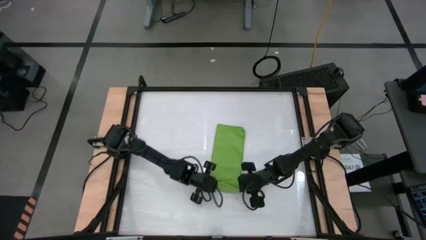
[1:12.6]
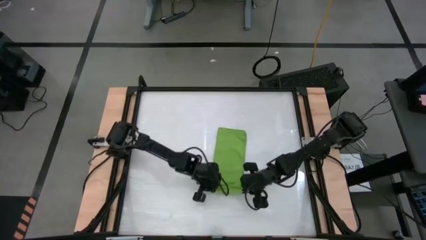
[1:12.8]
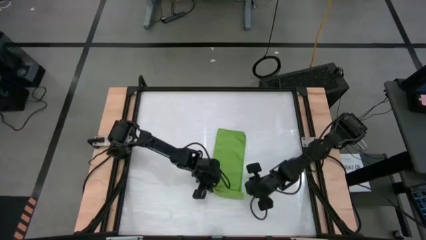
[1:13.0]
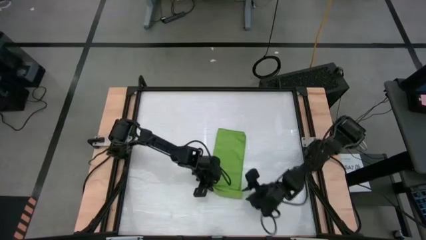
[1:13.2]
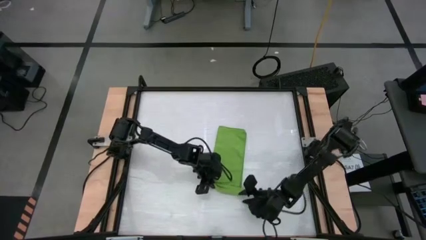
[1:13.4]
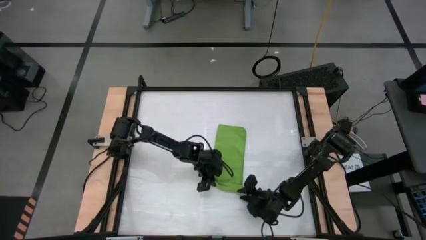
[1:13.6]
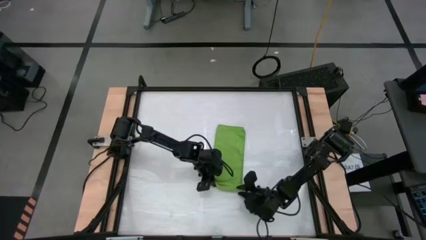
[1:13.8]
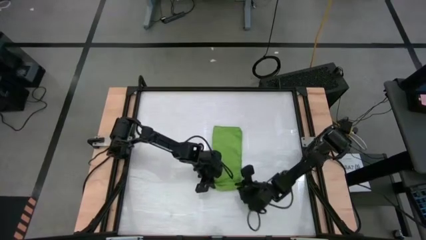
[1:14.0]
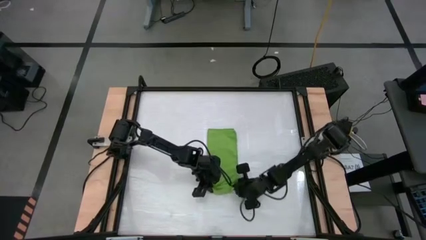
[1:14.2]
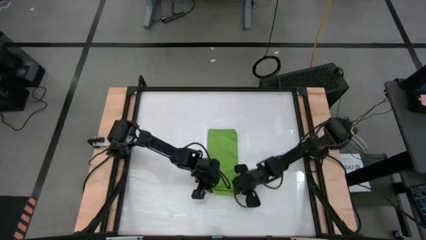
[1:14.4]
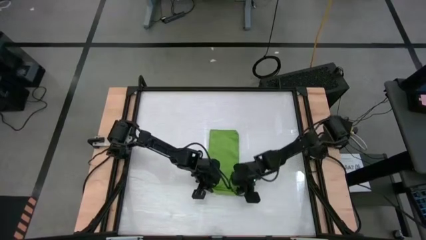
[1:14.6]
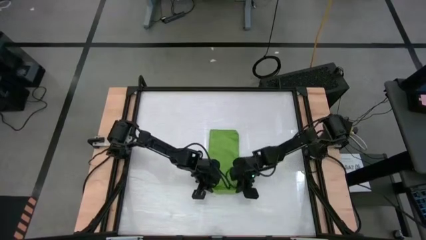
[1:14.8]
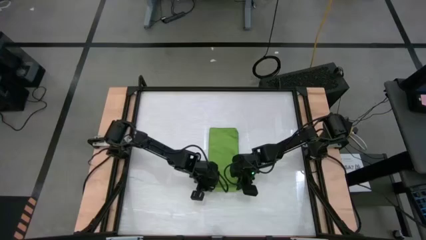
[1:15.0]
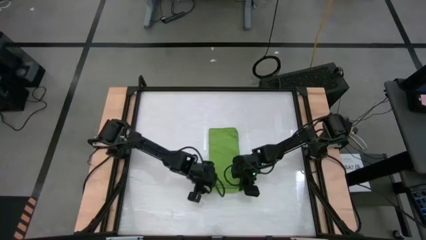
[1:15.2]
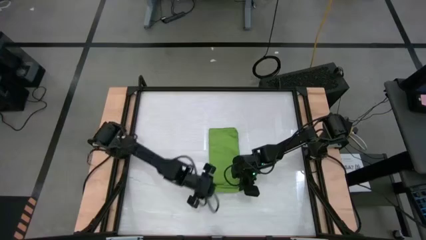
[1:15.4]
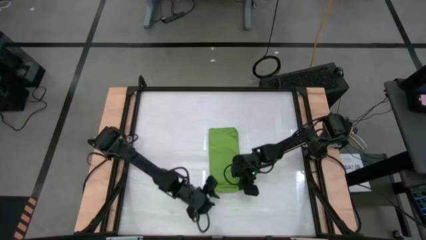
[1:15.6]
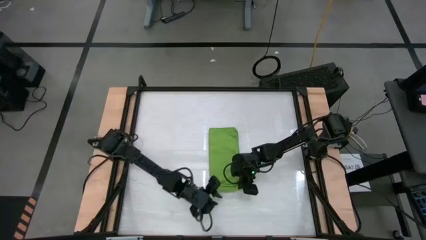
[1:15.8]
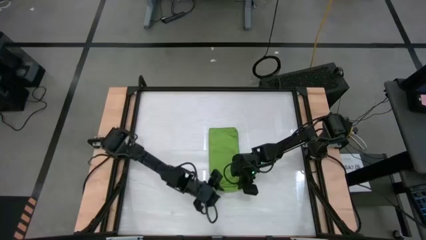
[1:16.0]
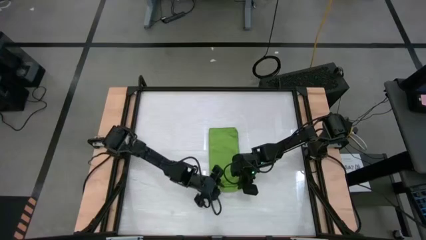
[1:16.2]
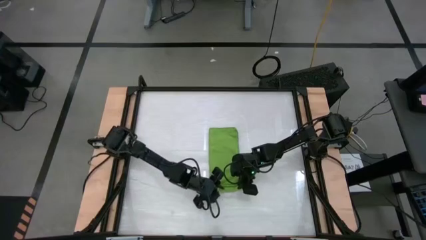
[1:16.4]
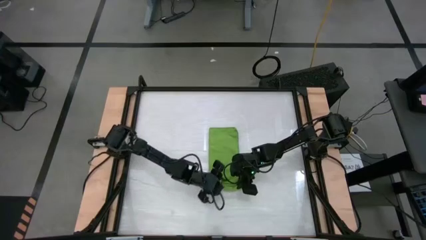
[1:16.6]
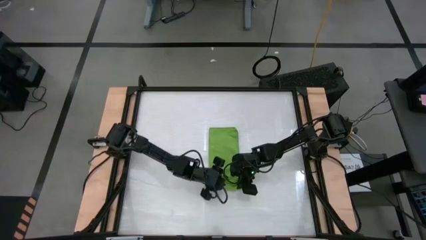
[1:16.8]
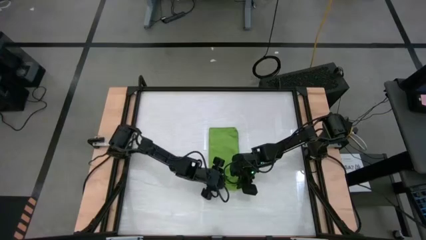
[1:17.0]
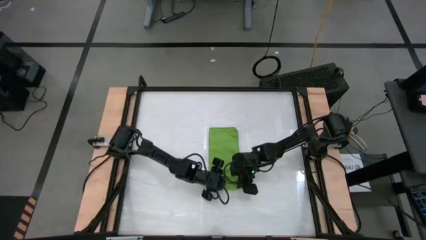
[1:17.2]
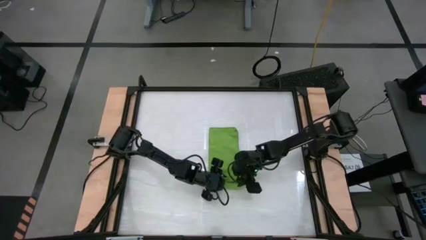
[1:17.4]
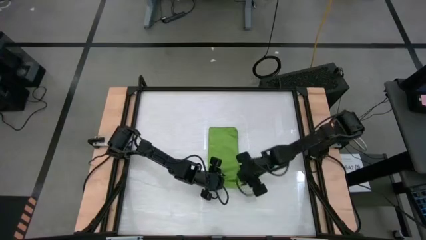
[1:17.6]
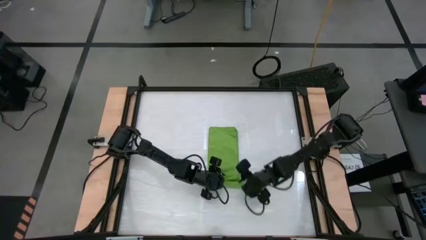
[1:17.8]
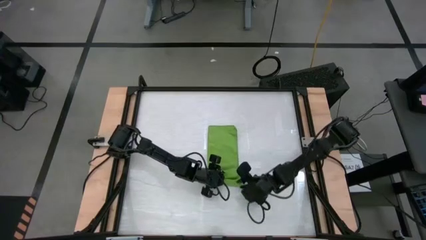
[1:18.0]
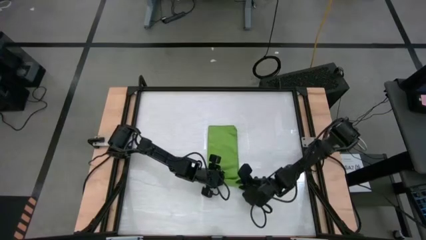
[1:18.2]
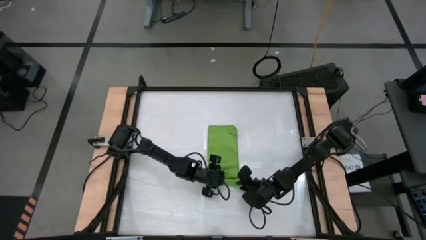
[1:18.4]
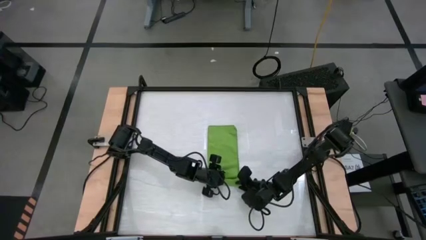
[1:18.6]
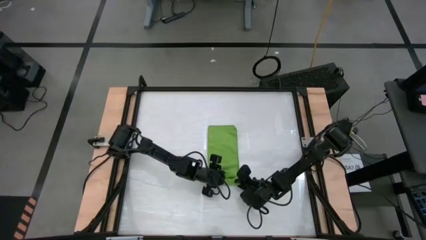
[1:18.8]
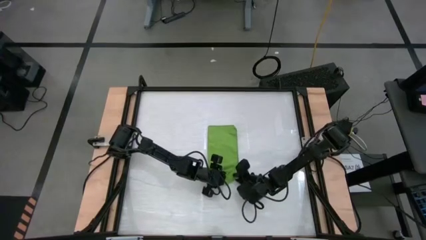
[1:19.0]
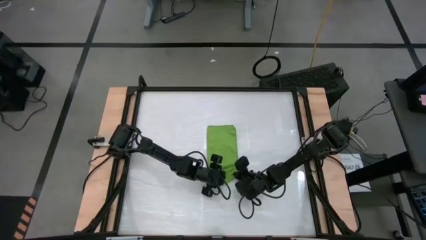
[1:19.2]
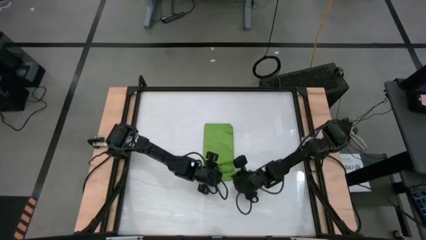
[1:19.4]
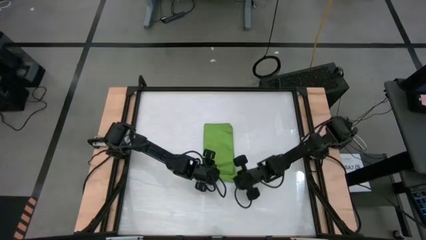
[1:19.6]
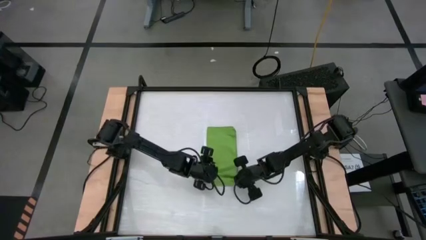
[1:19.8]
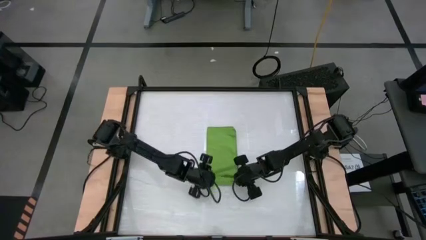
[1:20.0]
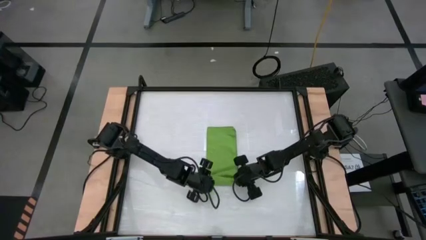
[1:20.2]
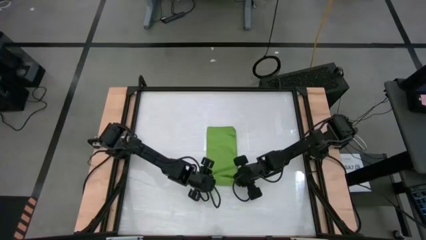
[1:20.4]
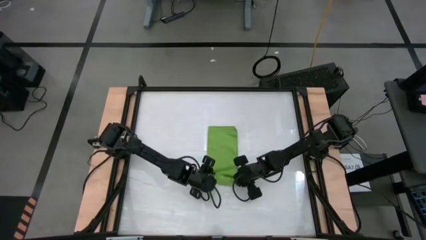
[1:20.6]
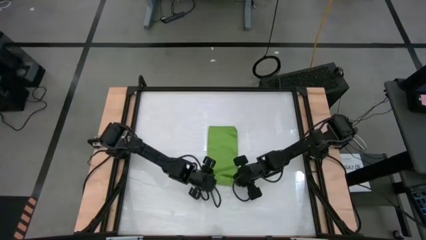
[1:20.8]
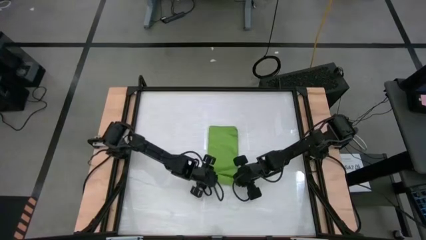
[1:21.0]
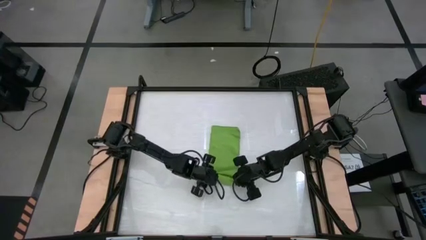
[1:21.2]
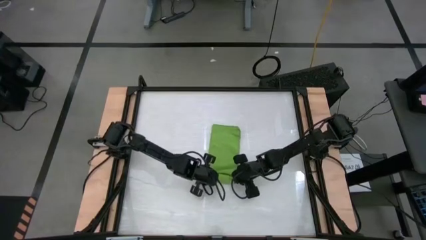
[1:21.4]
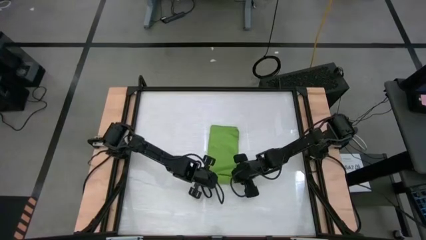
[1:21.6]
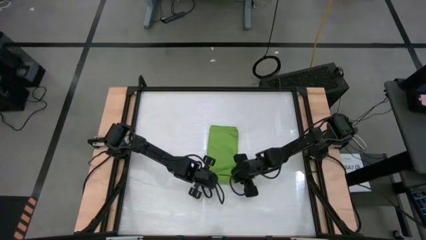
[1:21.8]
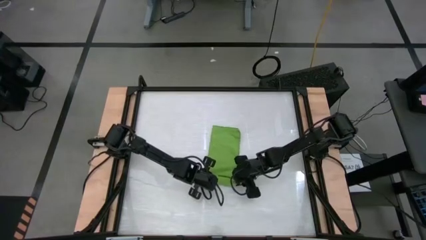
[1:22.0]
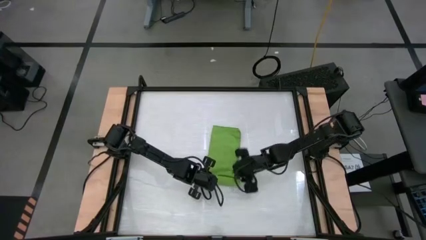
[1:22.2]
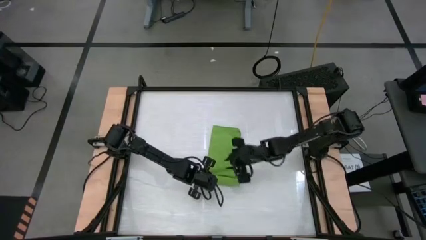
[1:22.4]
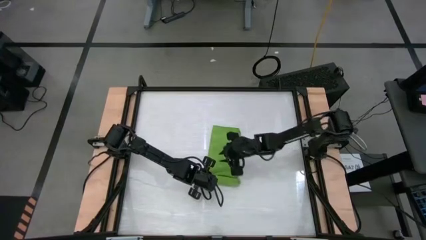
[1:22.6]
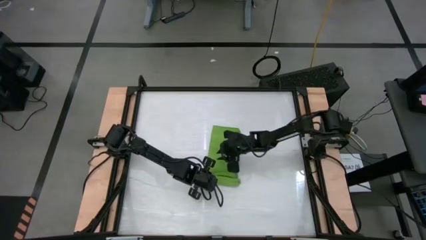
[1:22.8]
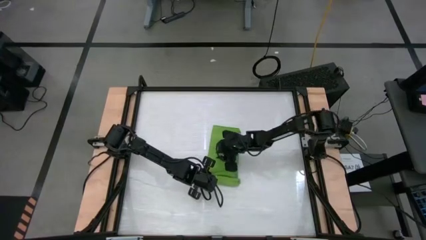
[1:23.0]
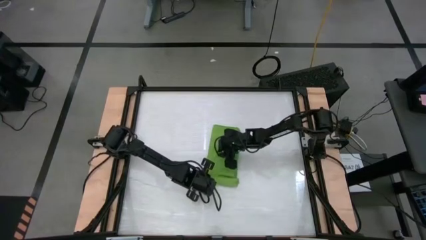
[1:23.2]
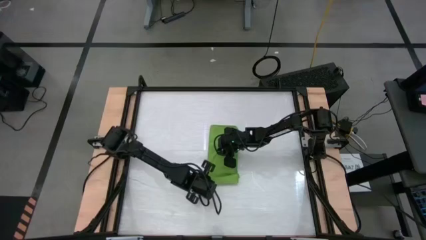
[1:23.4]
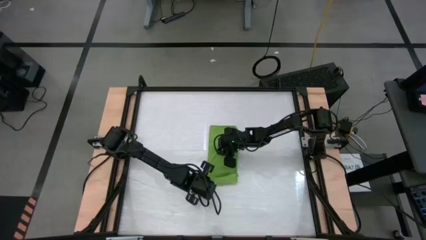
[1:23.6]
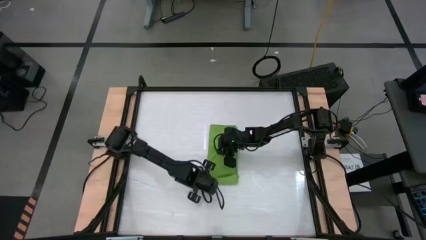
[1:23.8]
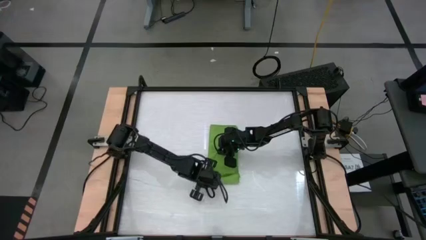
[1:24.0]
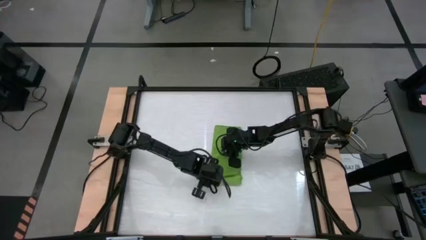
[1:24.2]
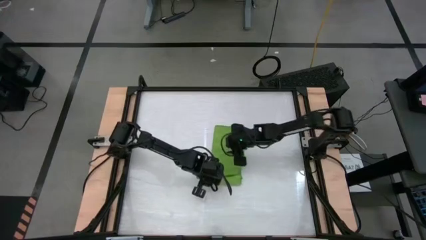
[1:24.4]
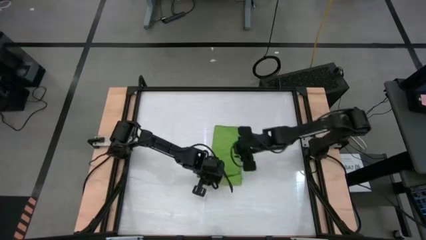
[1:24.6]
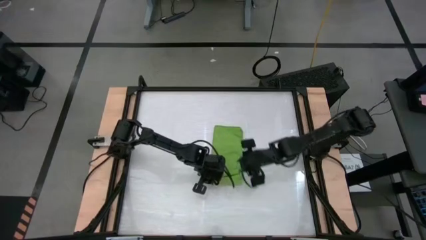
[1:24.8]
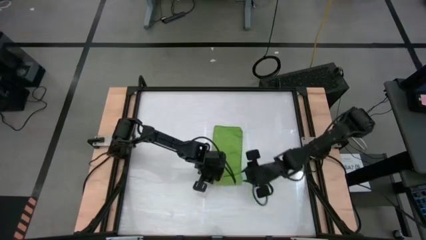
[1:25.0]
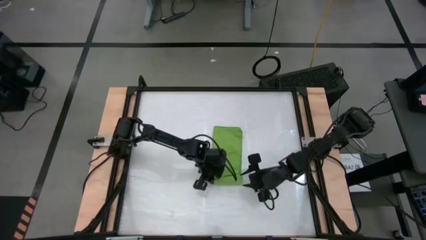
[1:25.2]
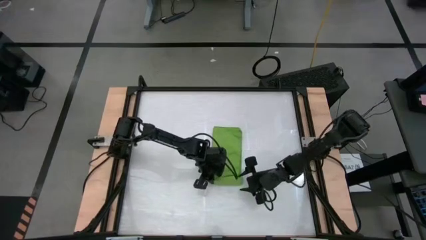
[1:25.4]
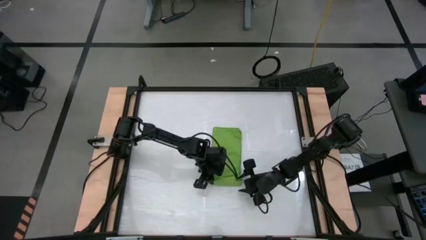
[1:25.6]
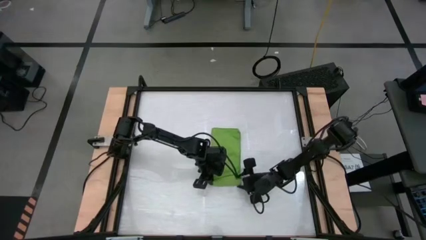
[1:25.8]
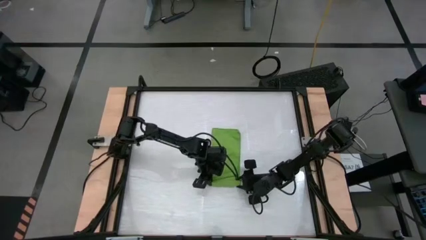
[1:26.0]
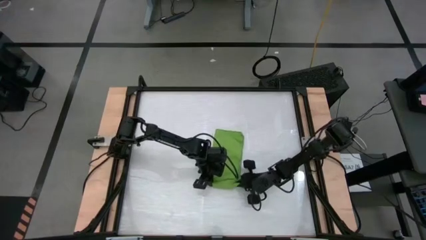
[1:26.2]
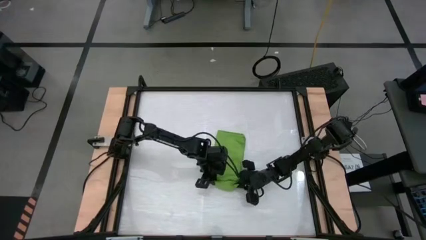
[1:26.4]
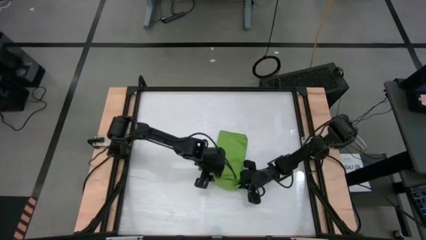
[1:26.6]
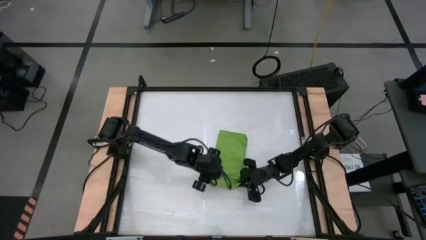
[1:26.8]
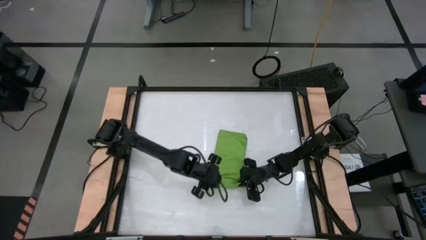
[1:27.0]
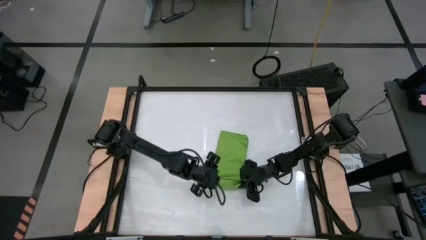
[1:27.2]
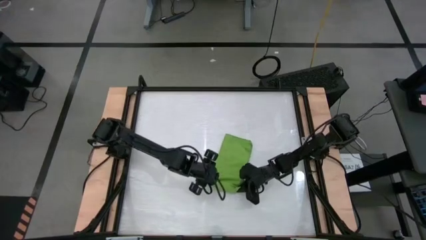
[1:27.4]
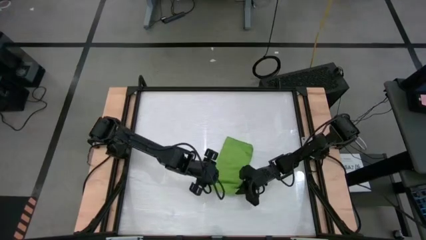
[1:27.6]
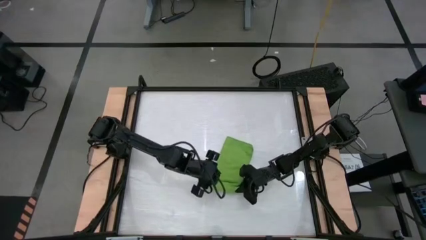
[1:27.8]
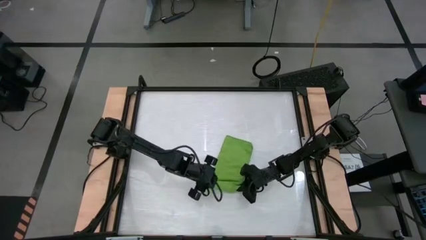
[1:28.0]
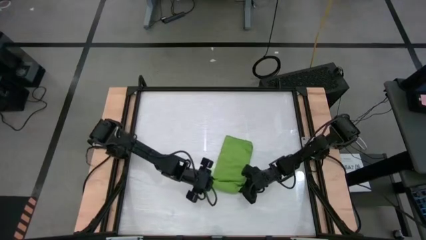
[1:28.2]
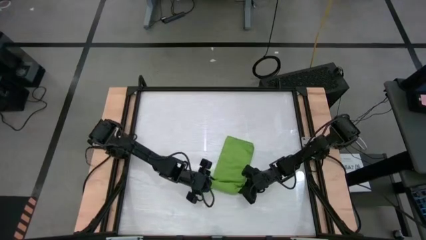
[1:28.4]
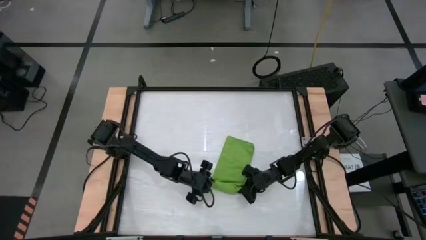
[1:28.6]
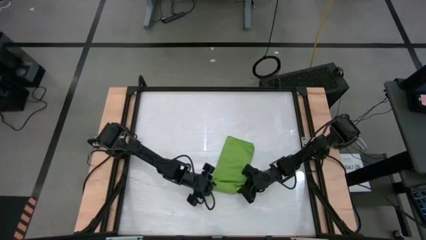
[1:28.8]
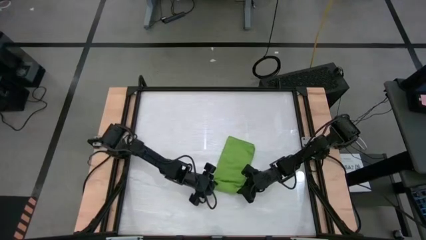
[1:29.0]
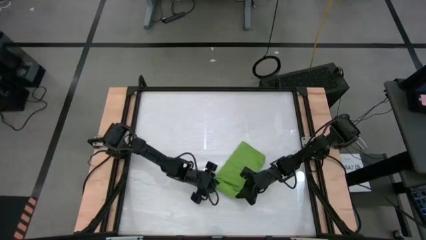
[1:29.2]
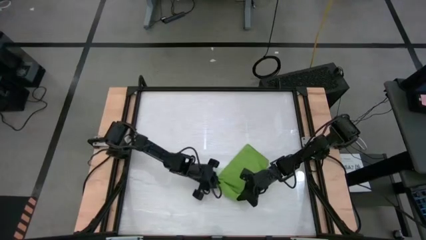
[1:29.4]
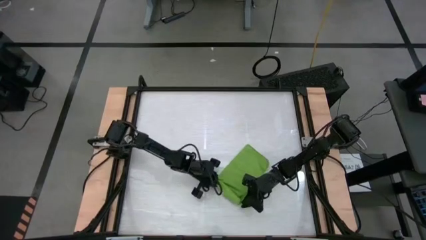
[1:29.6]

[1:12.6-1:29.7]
Task: Roll towel
Roll the green microfiber cloth
